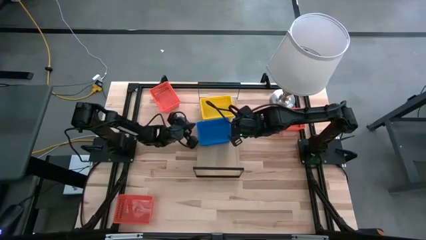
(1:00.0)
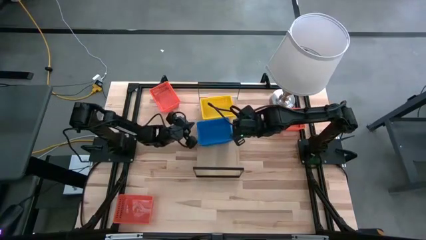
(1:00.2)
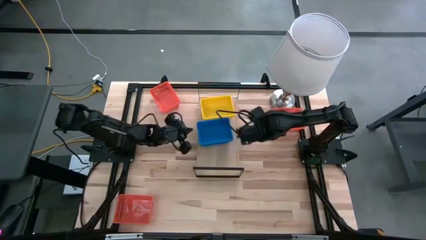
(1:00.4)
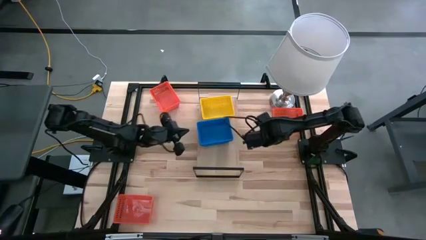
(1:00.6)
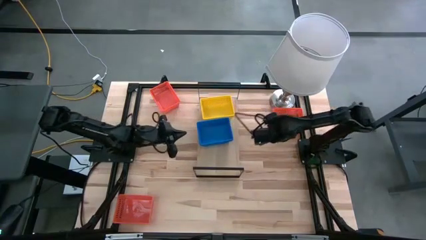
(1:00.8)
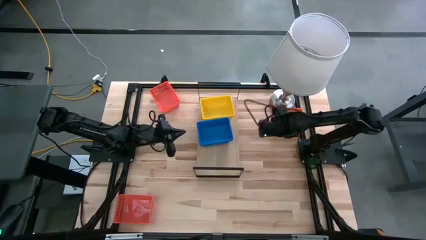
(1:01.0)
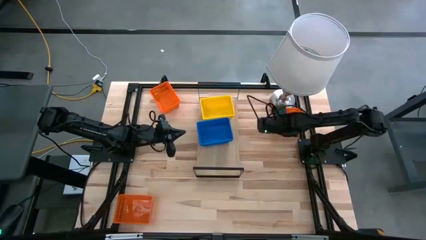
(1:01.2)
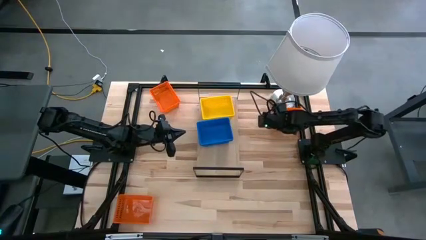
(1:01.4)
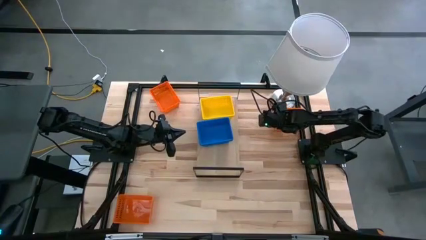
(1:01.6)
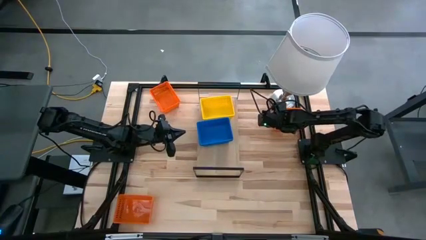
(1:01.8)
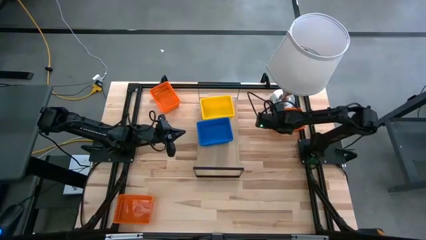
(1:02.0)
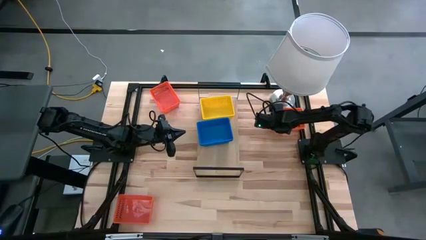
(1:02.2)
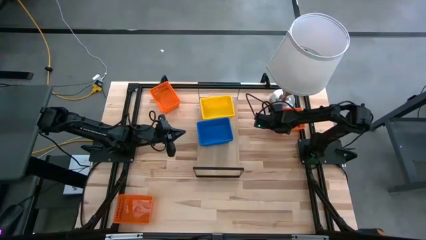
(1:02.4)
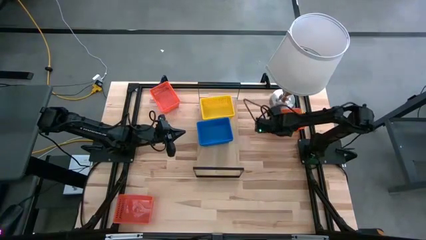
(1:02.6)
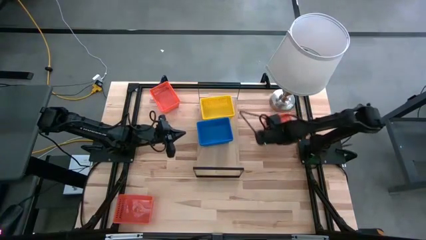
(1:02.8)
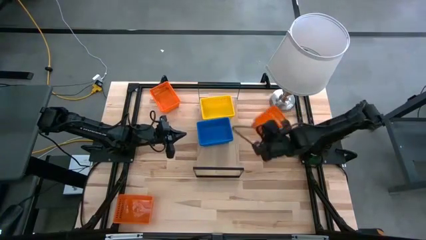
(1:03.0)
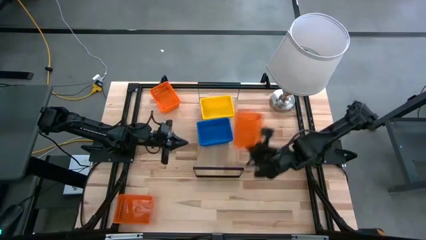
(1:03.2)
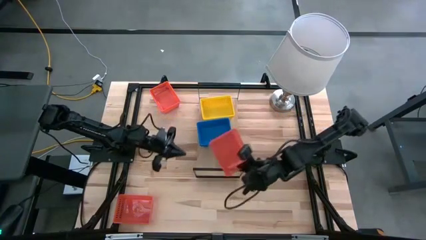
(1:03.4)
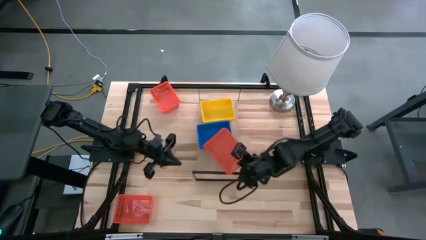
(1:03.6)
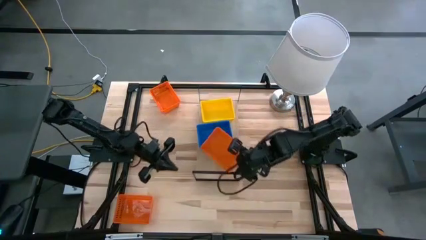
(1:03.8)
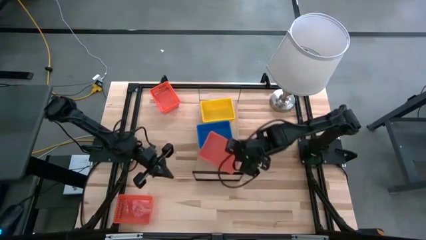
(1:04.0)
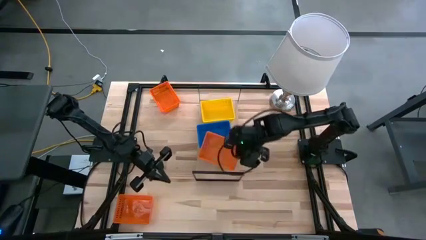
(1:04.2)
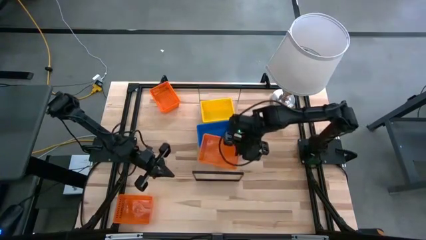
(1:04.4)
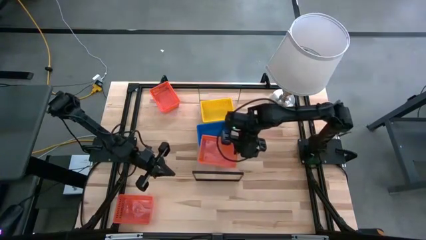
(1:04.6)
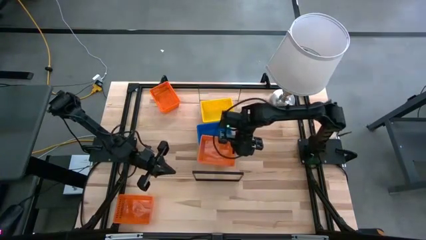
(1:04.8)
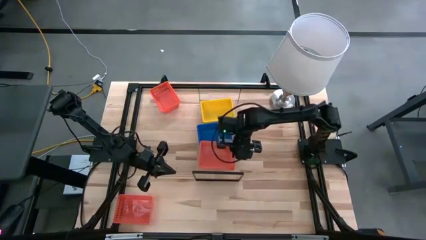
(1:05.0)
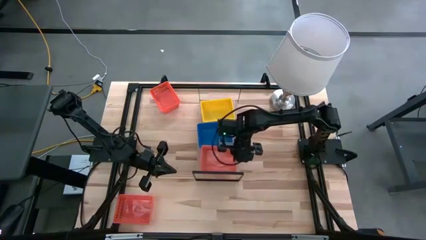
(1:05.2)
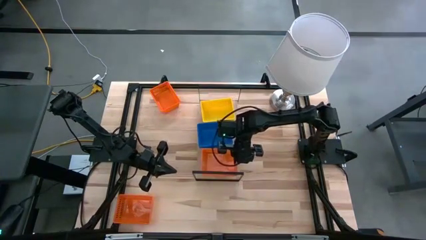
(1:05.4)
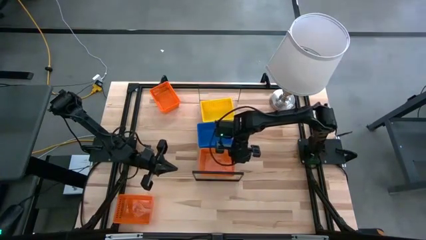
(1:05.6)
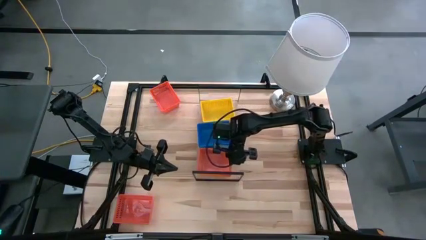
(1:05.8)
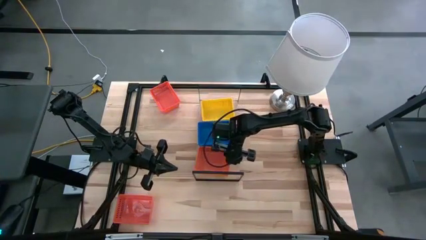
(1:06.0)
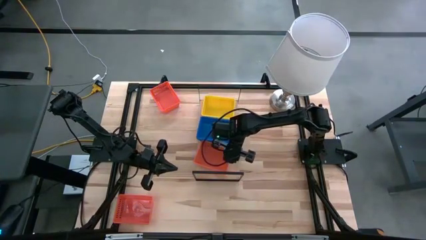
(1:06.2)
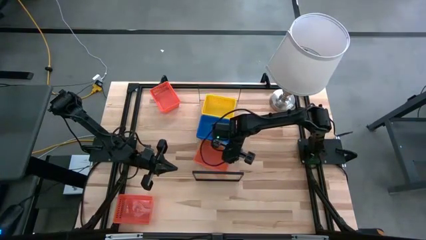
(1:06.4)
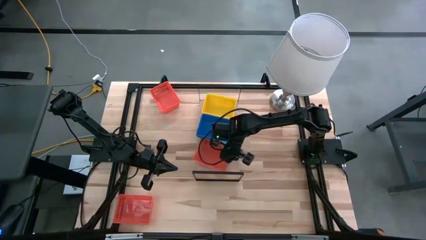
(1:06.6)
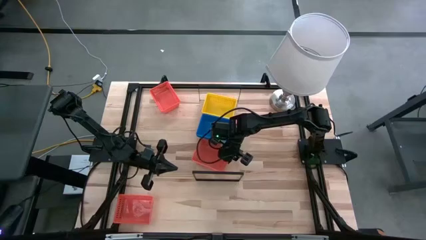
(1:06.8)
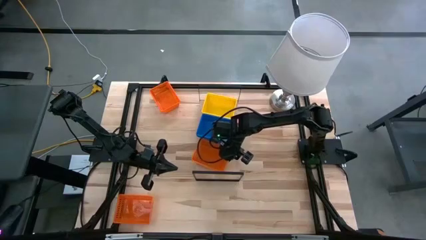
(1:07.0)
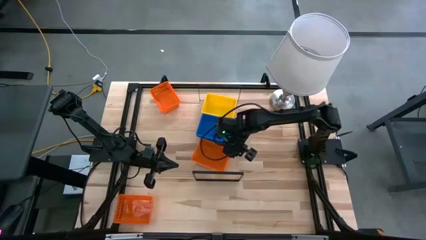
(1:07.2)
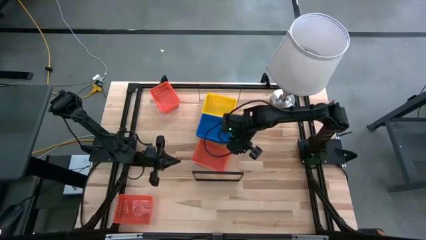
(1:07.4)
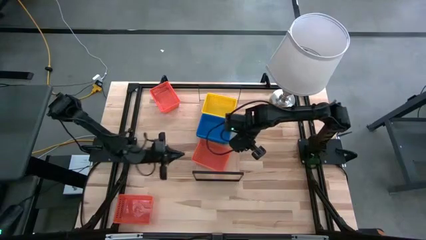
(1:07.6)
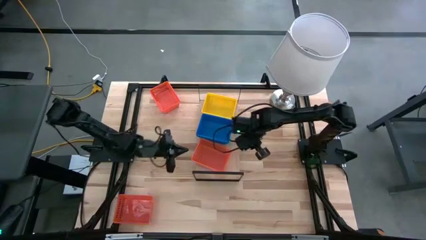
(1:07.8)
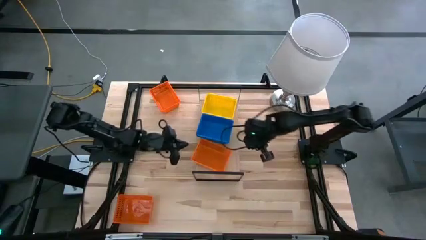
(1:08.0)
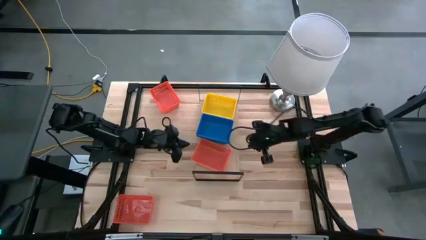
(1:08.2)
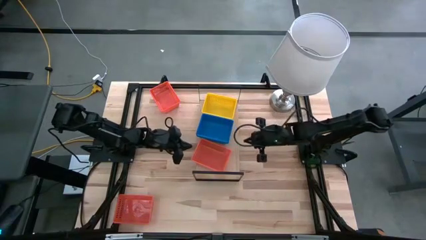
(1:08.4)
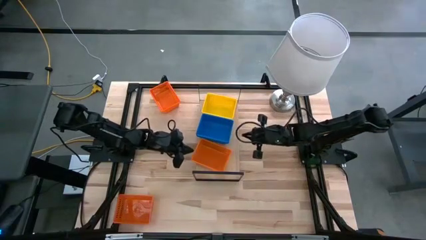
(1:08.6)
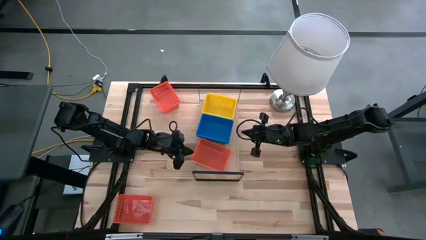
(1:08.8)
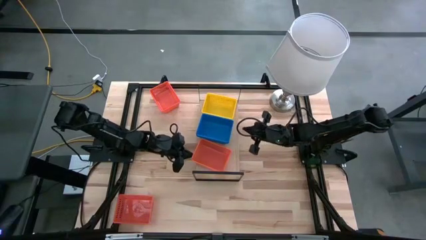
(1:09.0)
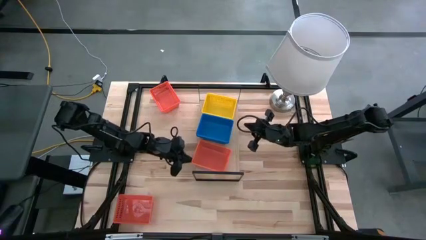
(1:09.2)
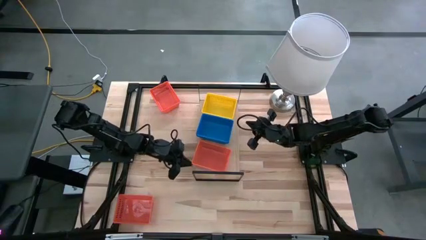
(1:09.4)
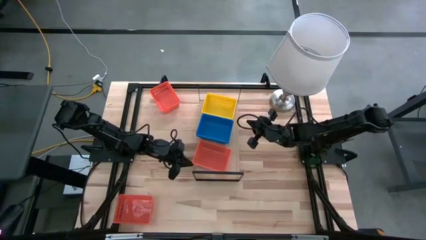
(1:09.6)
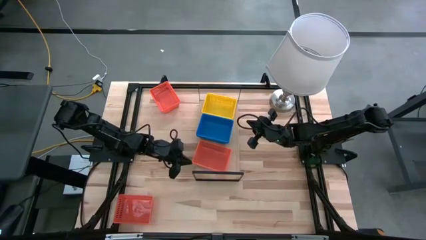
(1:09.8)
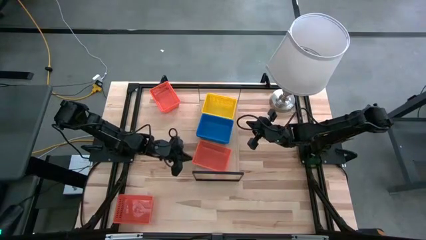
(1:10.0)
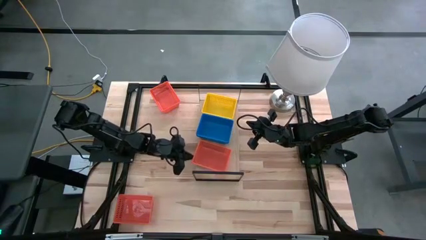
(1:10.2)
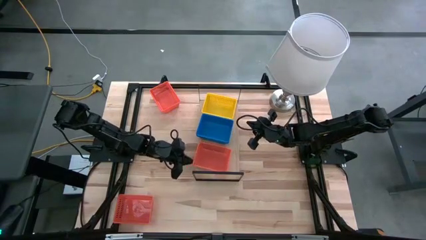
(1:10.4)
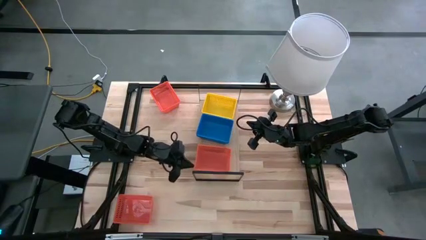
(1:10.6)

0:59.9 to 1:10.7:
Task: Stack baskets on shelf by color
Put the top right orange bin on the shelf

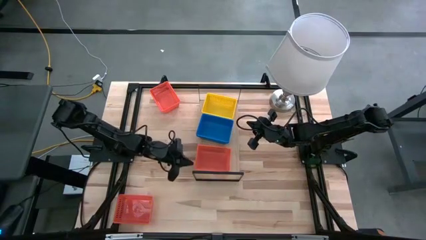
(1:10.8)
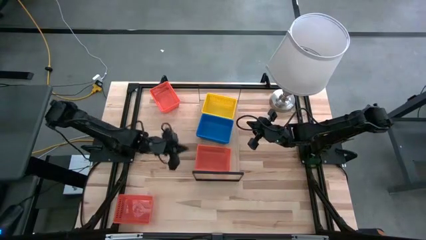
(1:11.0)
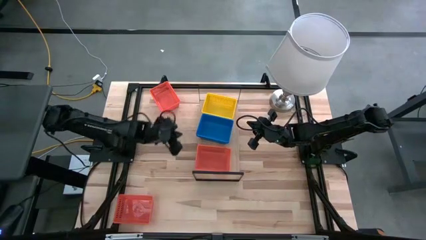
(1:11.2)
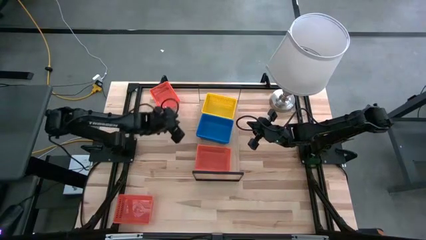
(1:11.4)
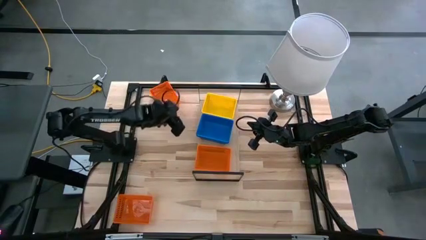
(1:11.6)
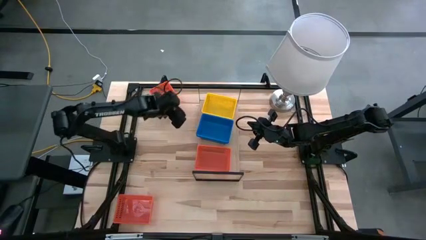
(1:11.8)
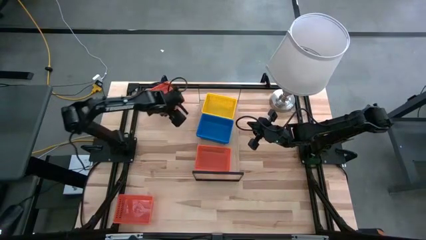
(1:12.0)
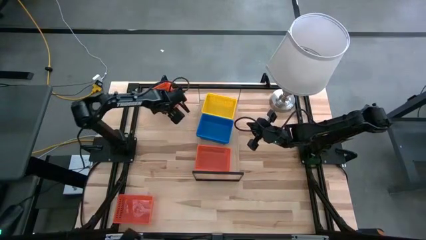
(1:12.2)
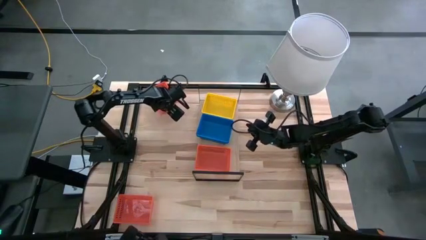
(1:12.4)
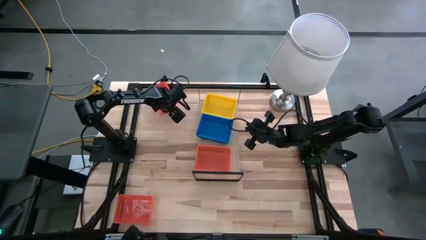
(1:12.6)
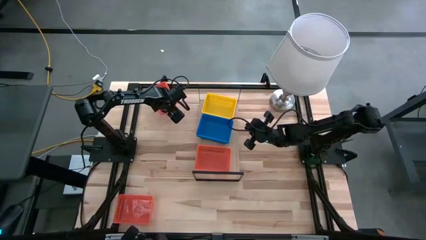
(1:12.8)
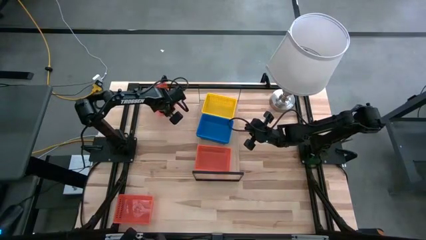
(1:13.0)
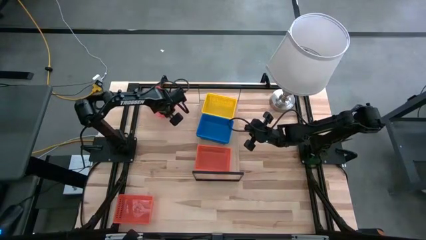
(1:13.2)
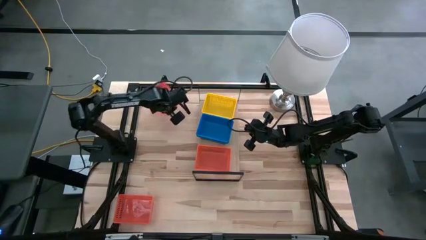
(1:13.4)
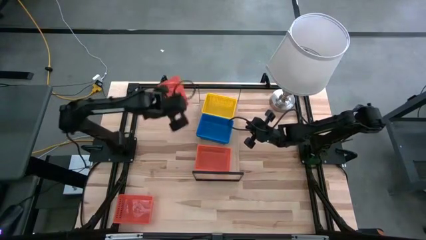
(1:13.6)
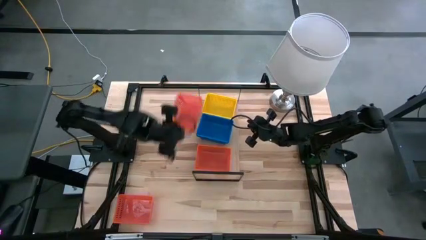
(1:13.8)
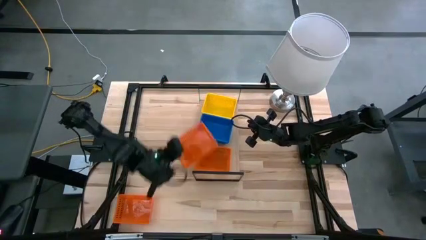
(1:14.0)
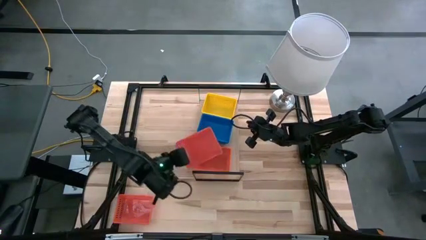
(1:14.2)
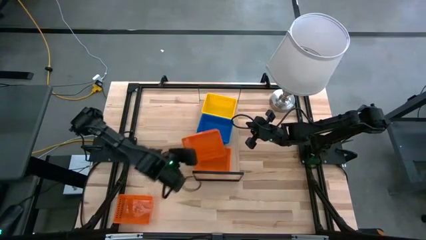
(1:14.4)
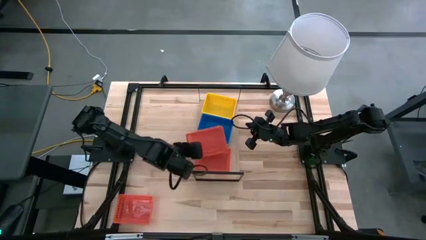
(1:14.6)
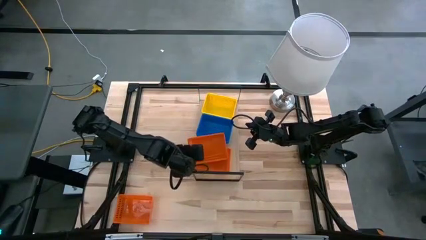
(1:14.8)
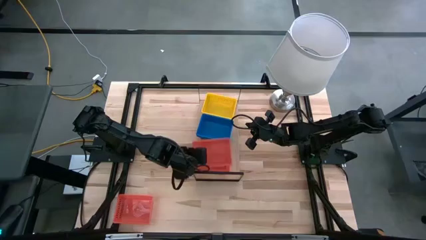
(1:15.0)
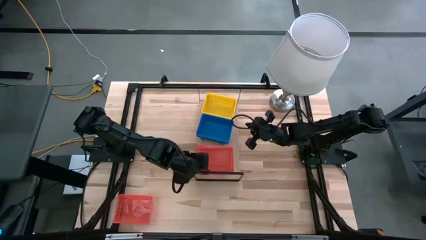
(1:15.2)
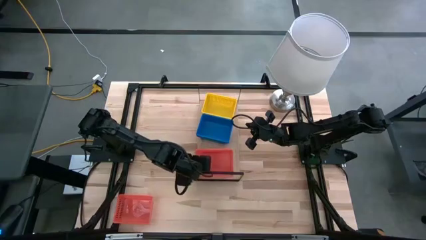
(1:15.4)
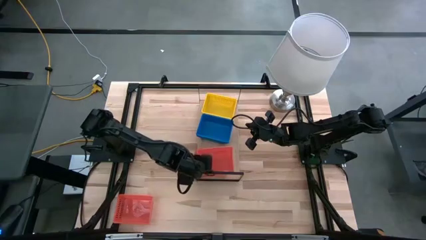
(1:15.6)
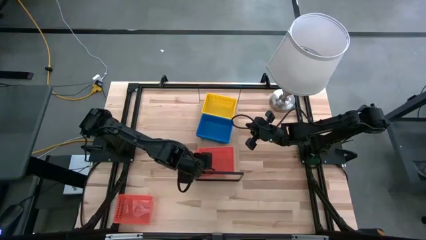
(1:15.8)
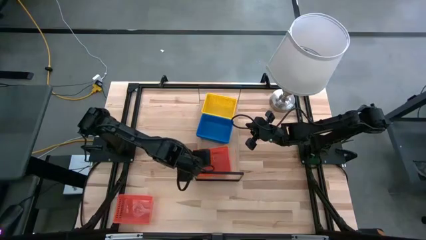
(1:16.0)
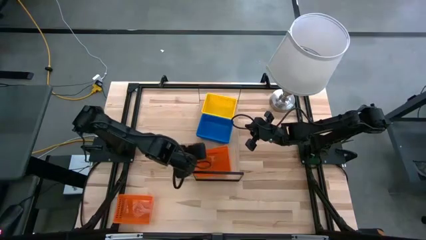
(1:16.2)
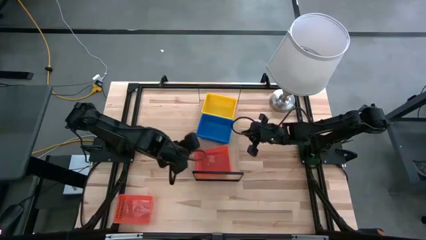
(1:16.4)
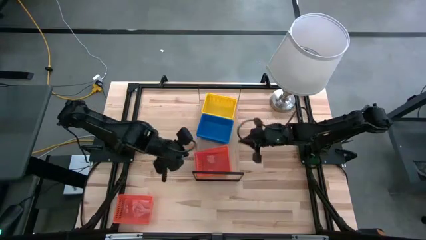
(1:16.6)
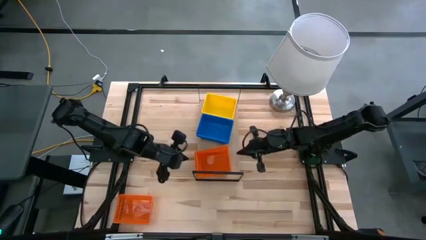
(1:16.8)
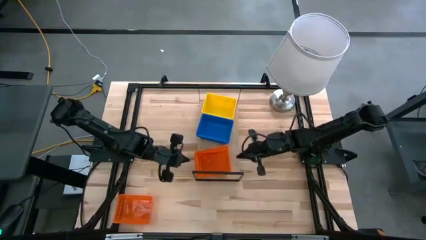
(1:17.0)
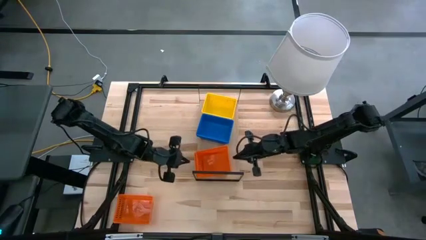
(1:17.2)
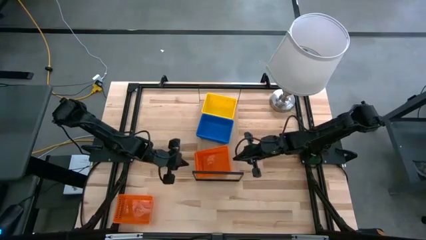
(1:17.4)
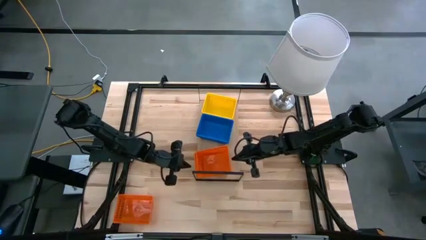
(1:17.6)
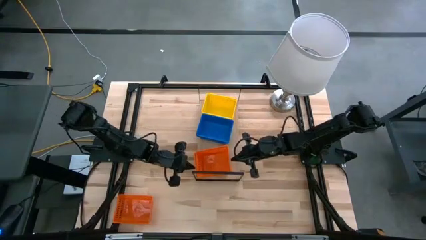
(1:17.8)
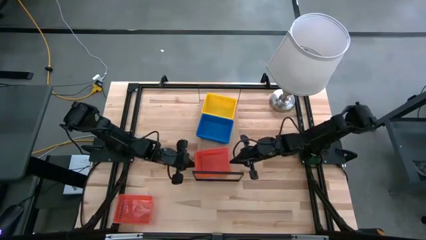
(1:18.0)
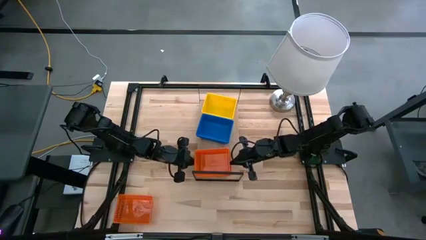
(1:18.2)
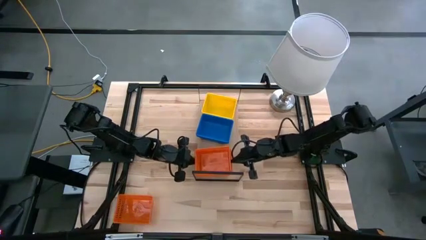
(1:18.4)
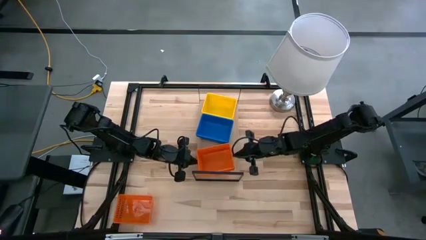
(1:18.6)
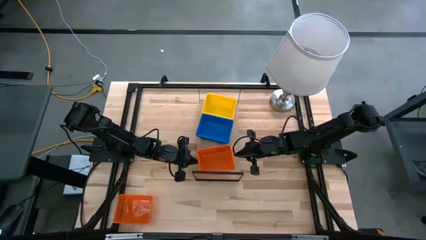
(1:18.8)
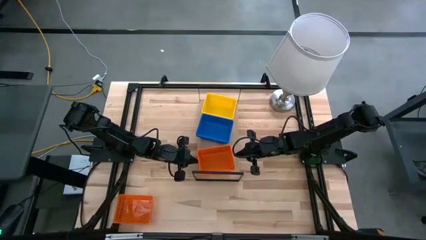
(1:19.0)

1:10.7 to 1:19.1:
Stack the top orange bin on top of the orange bin on the shelf
